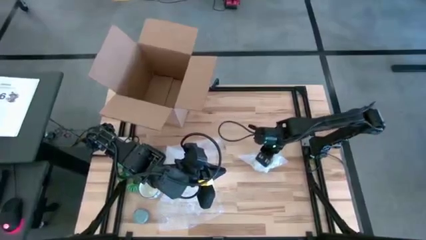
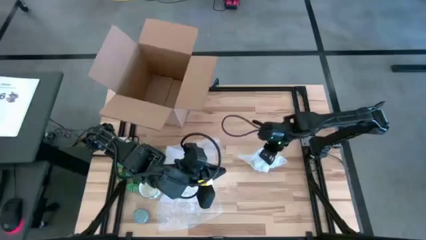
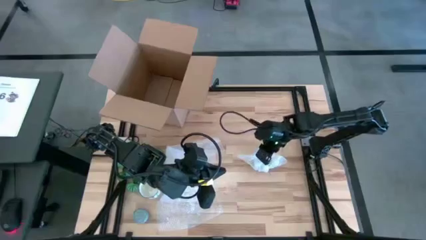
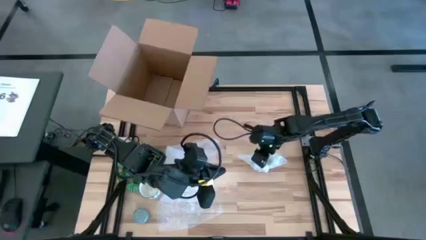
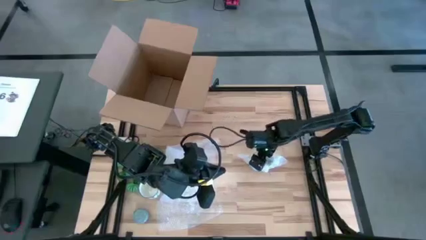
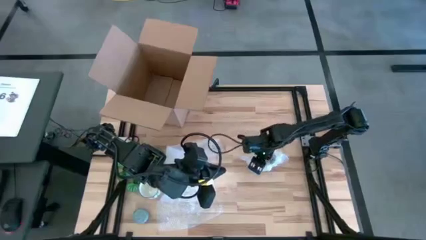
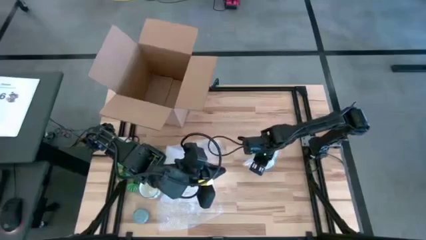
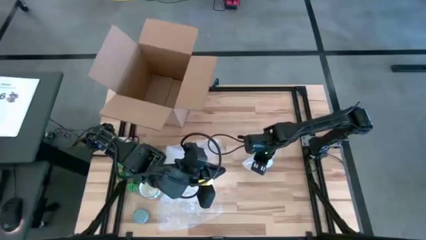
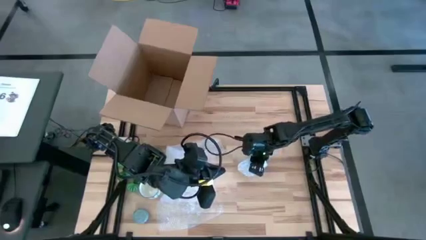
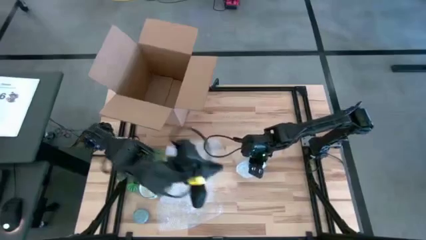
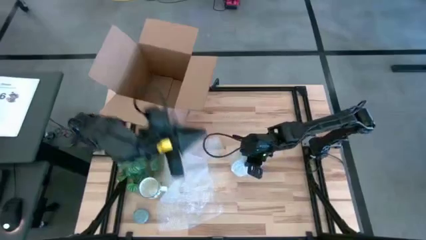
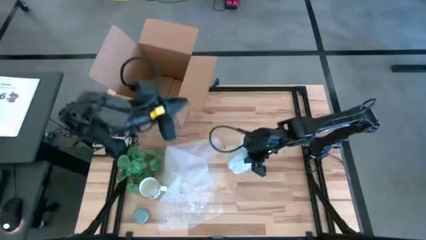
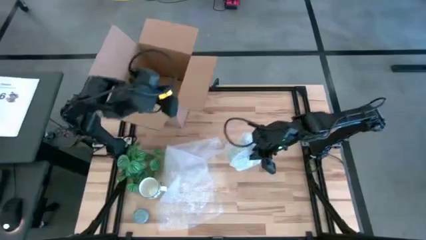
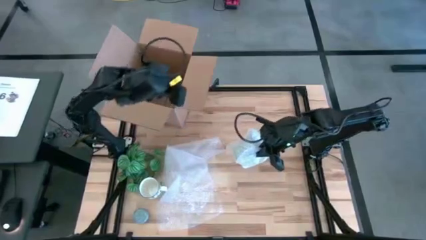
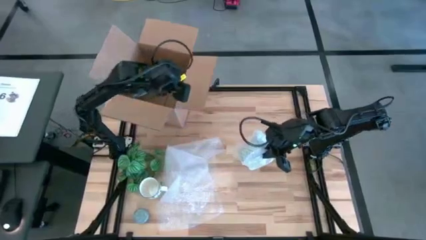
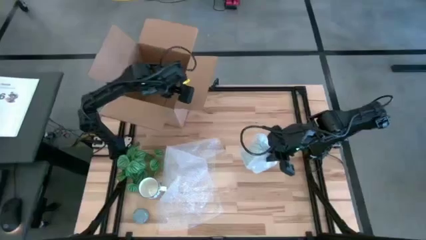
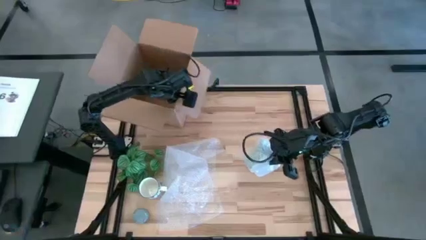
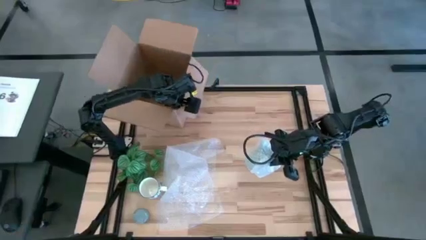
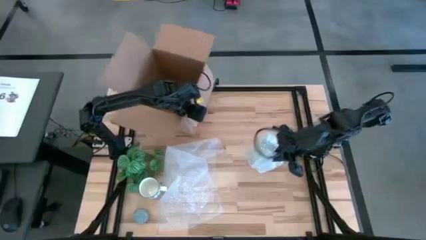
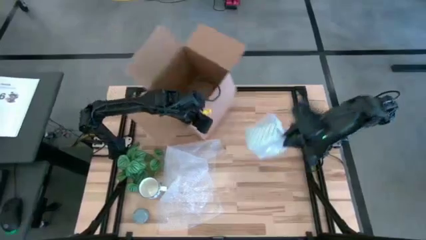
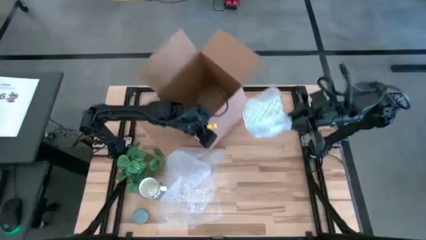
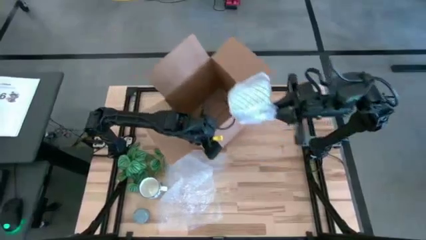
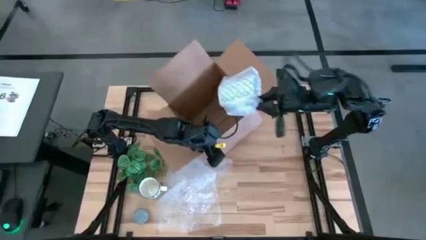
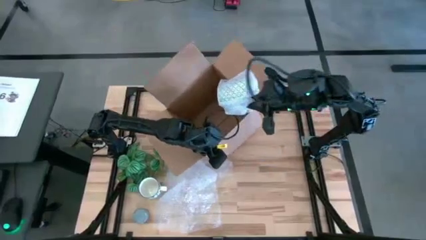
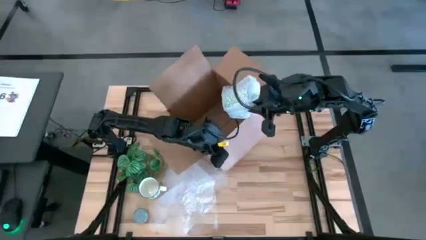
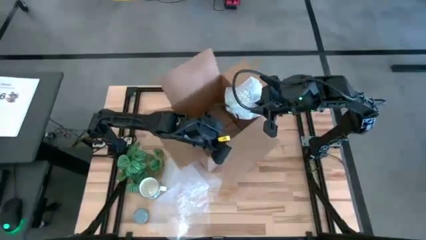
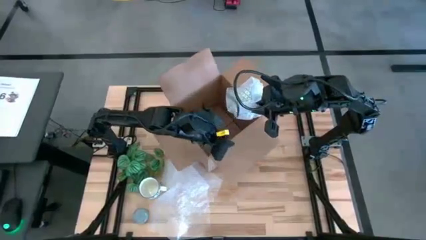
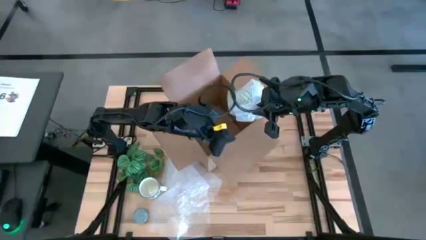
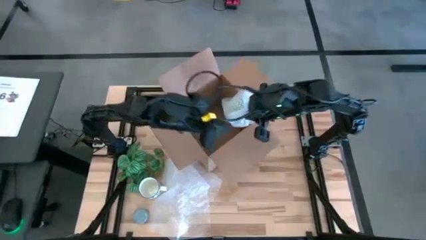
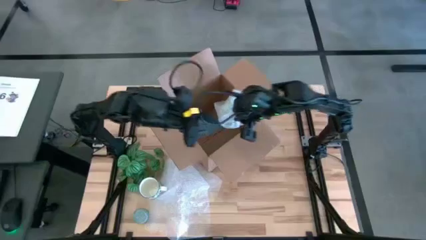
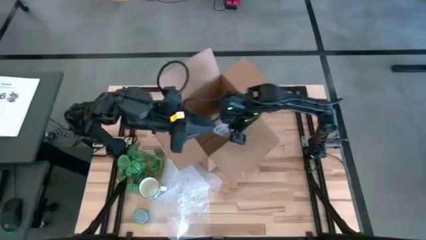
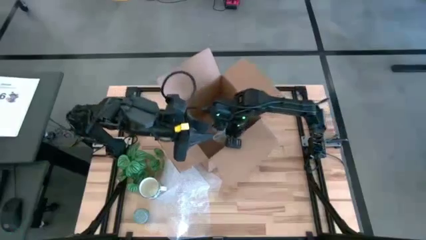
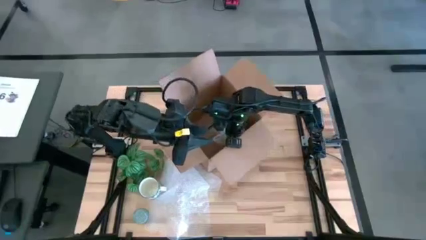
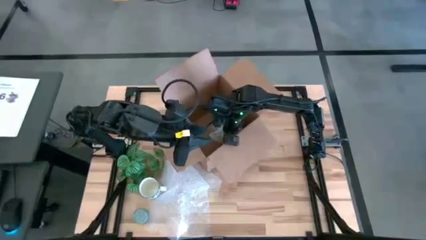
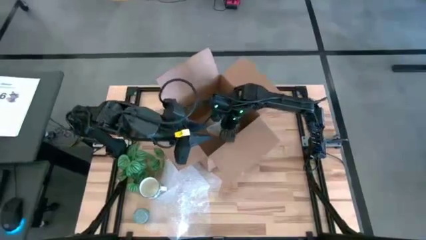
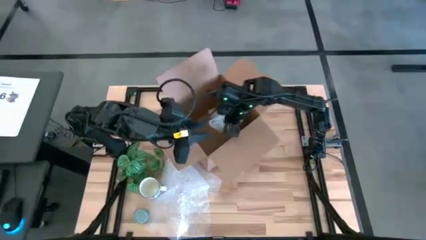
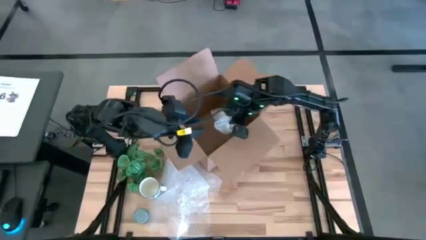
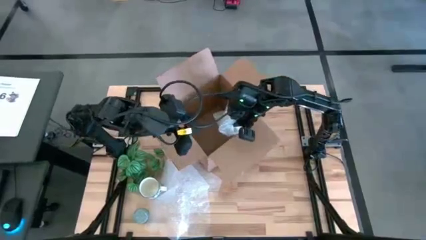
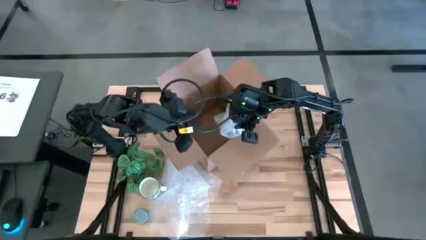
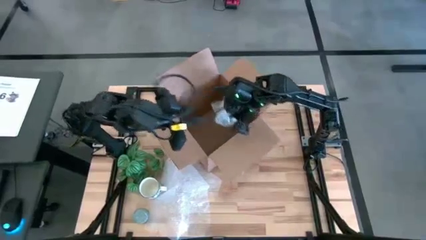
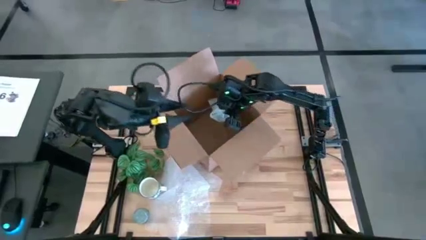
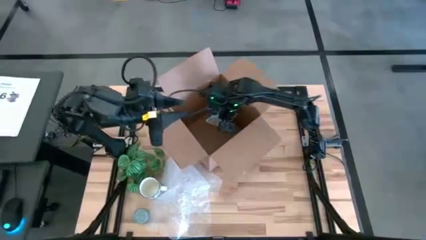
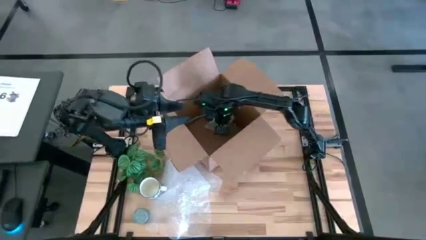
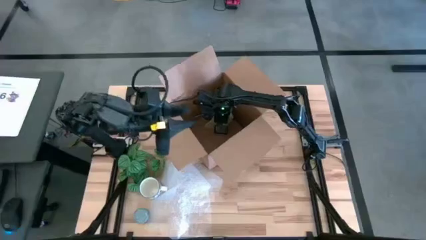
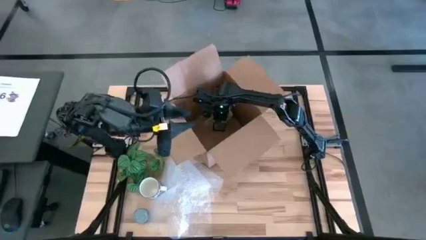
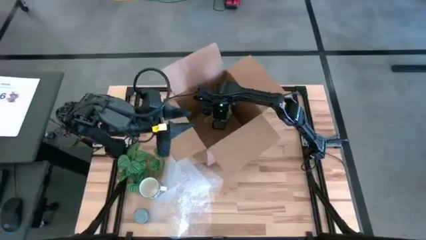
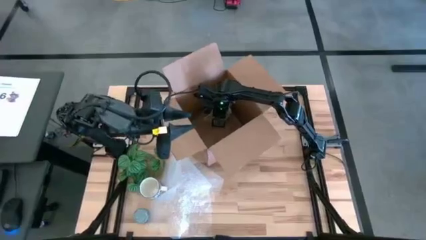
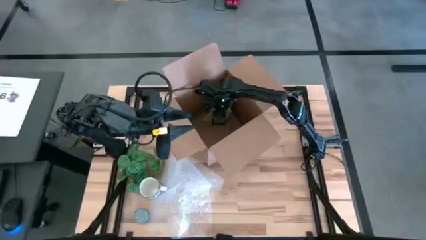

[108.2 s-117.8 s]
Task: wrap mug
Put the wrapped green mug into the cardboard box

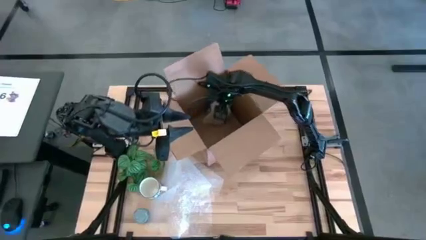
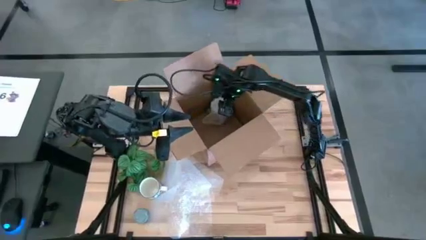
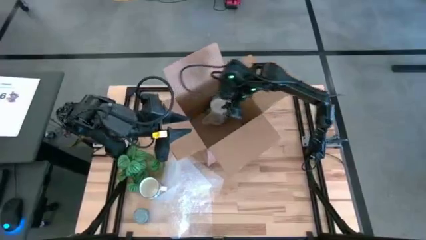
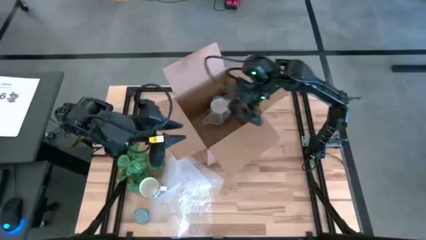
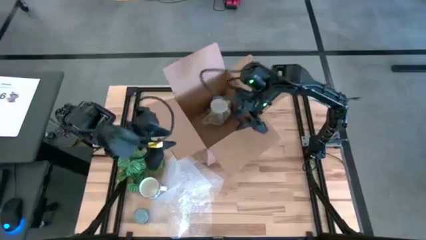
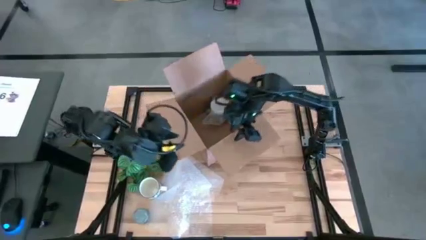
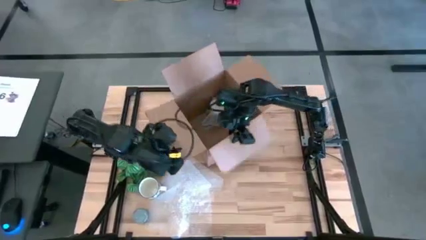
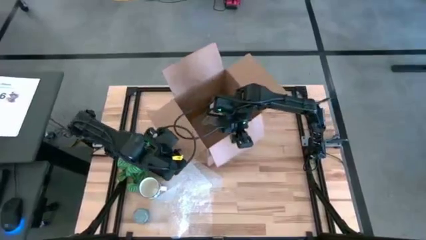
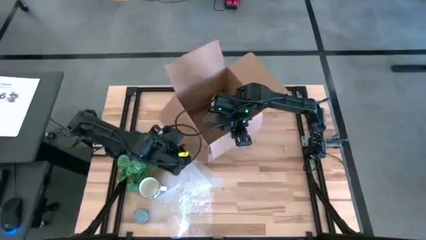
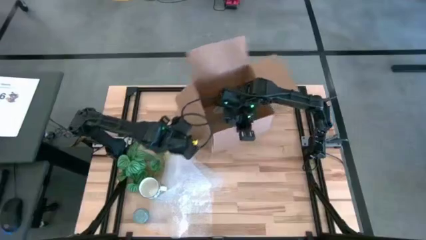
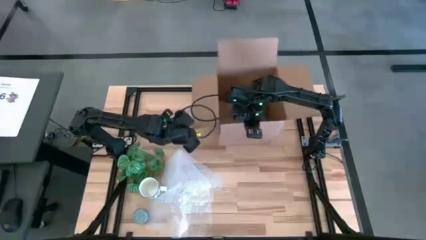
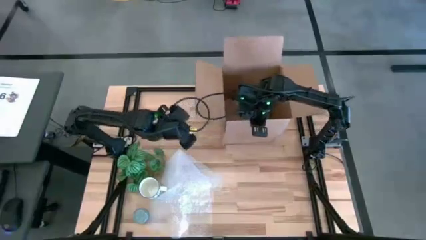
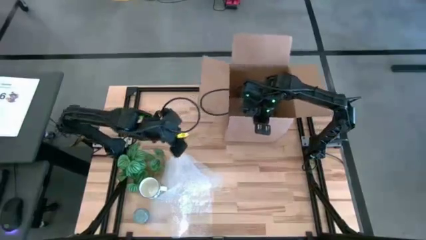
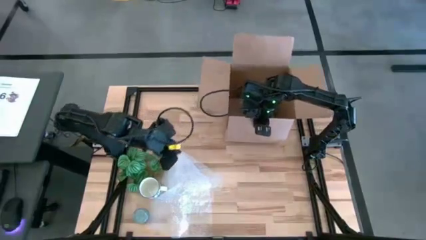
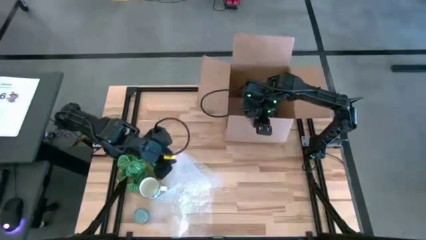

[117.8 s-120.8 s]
Adjust the cardboard box

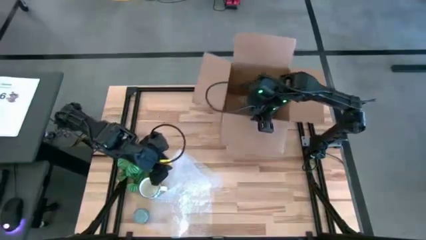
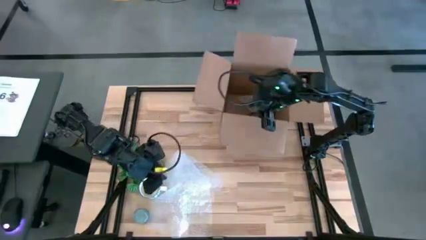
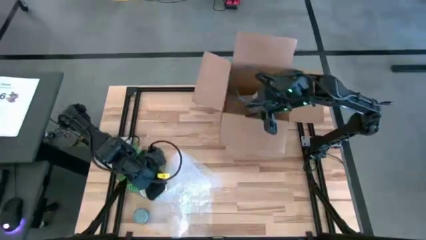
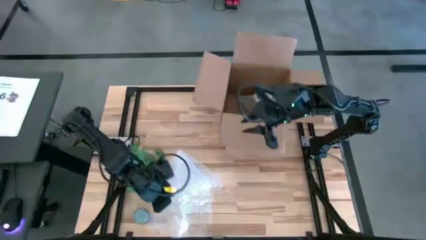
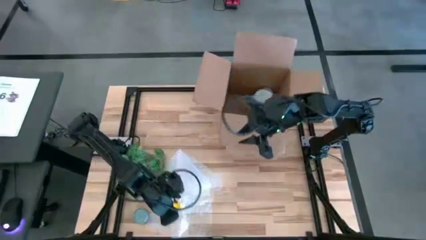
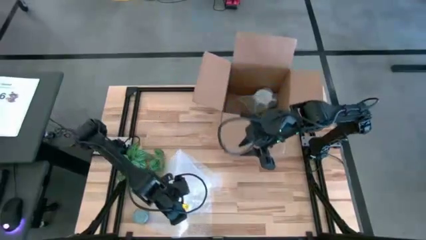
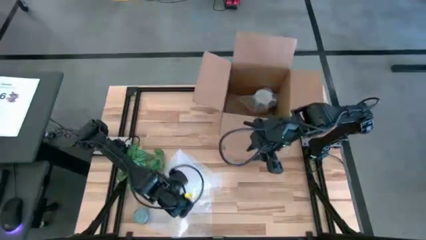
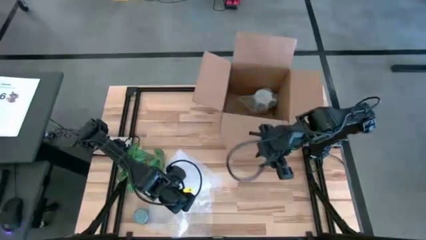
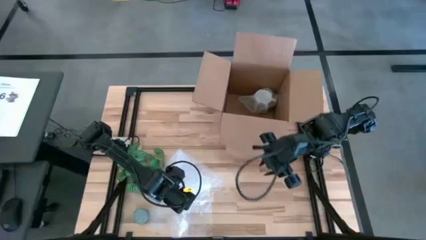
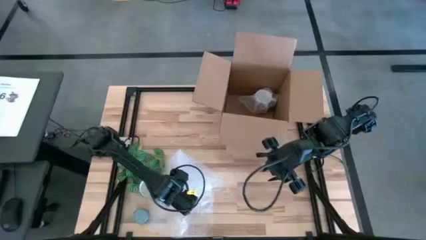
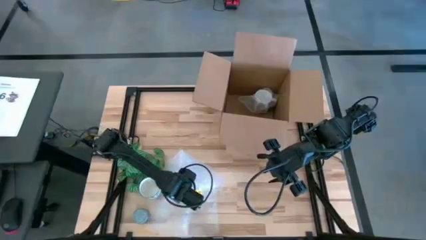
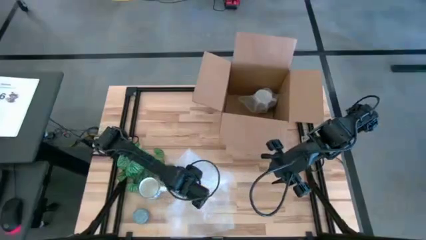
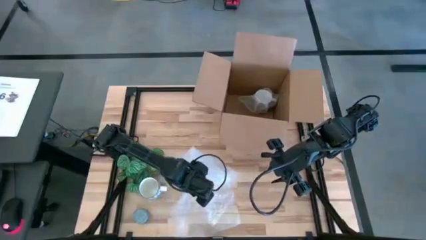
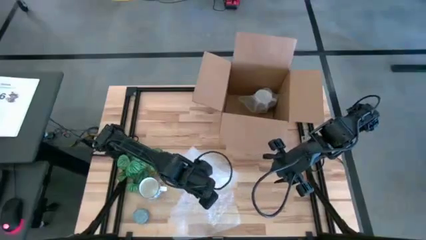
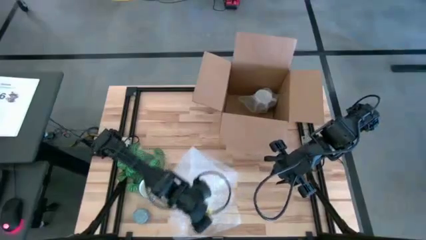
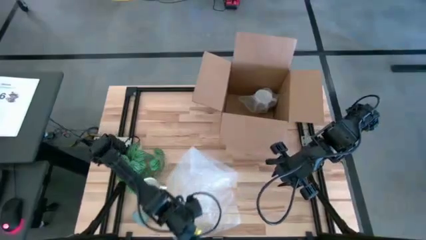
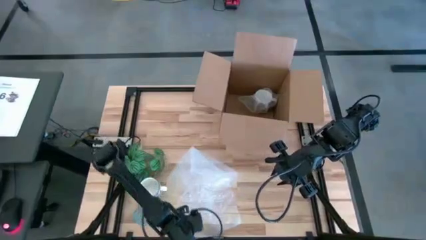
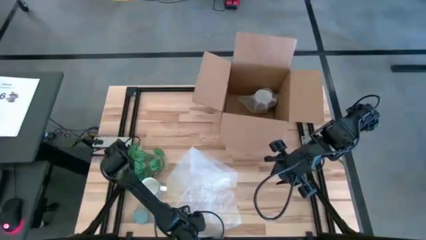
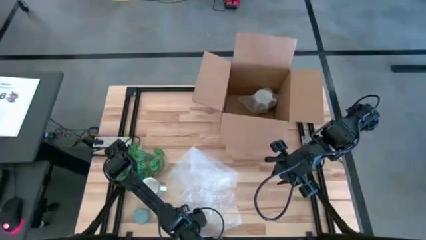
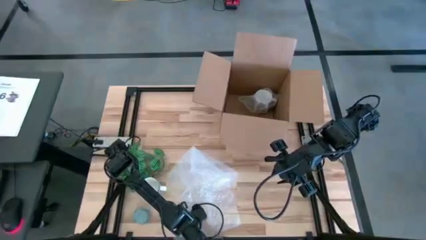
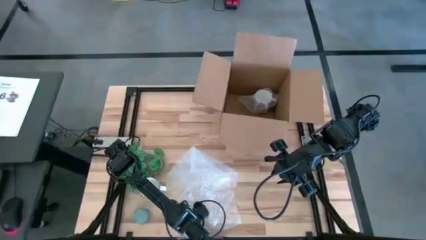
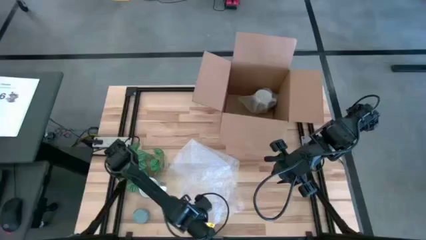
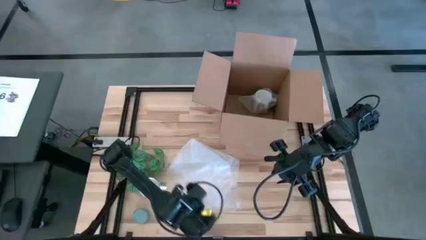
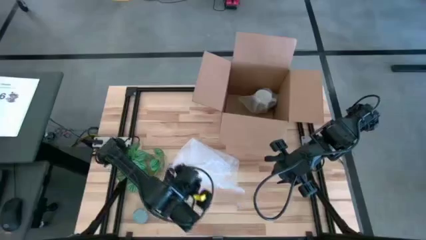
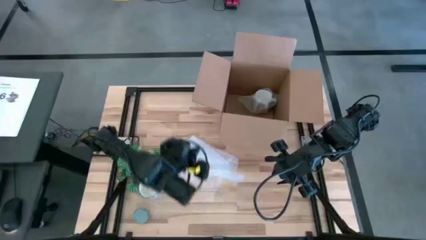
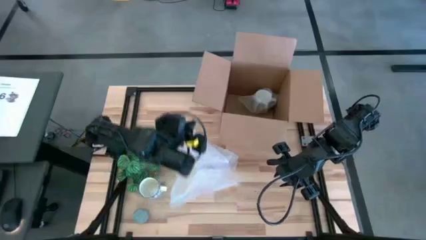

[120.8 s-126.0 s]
Prepare the bubble wrap
